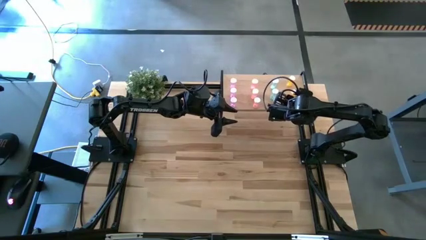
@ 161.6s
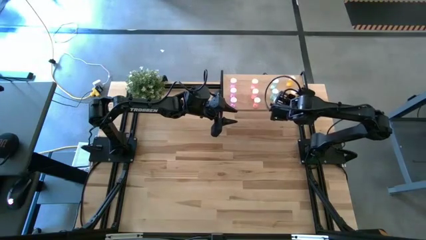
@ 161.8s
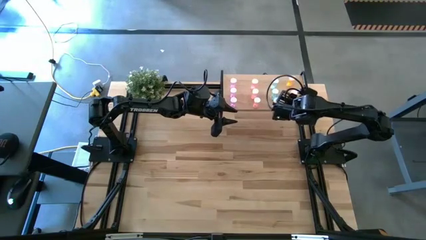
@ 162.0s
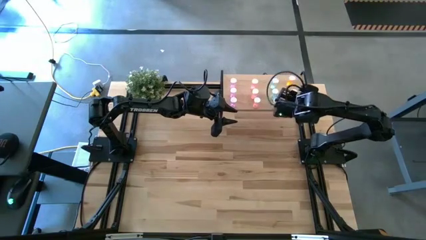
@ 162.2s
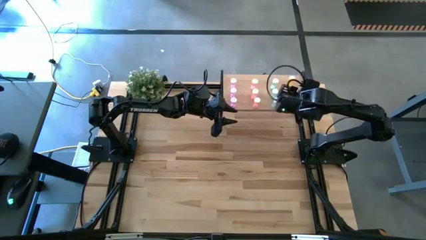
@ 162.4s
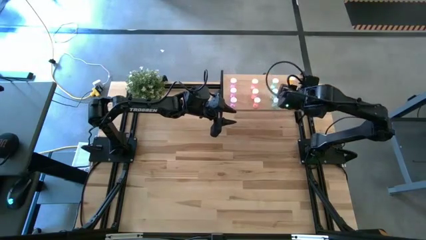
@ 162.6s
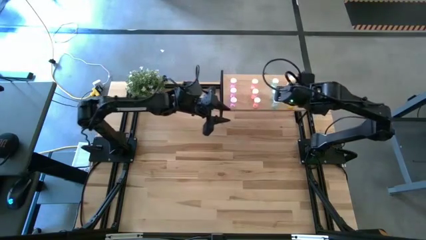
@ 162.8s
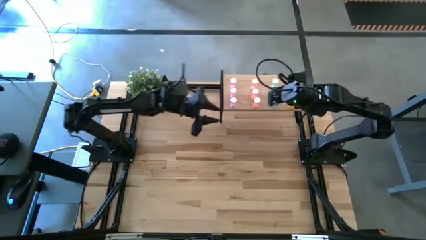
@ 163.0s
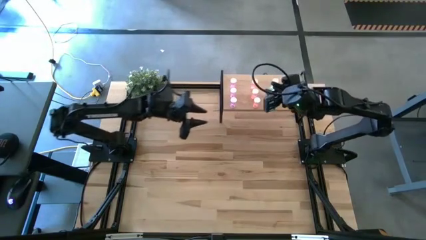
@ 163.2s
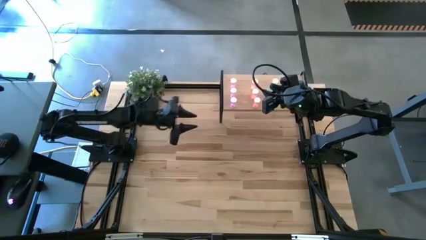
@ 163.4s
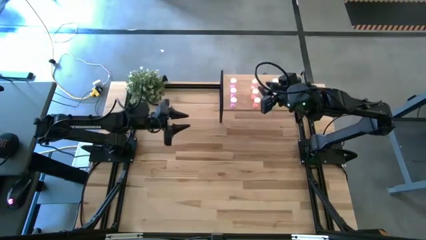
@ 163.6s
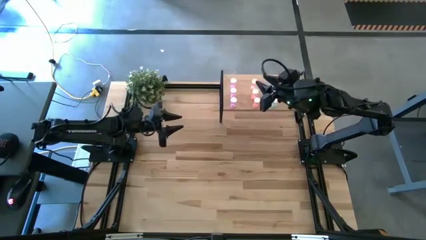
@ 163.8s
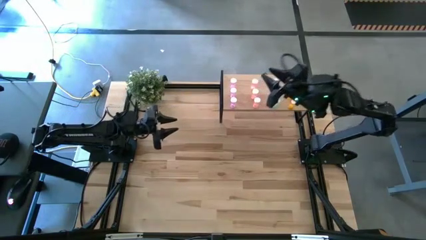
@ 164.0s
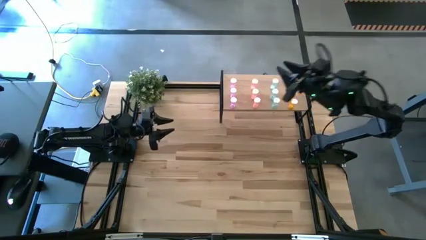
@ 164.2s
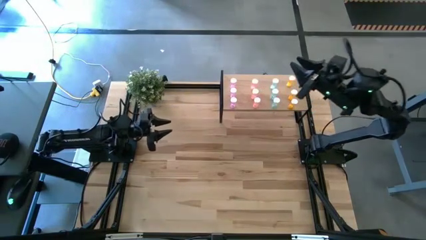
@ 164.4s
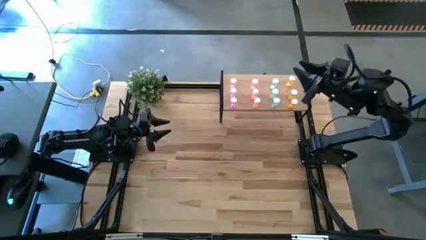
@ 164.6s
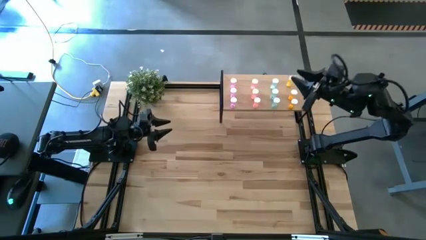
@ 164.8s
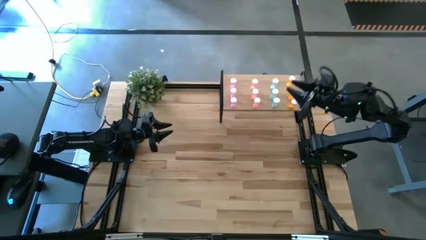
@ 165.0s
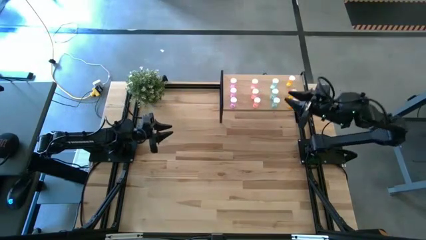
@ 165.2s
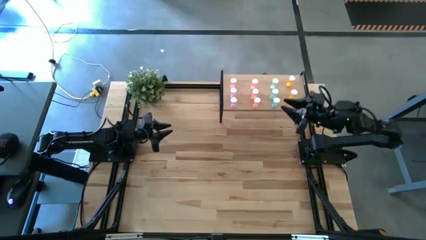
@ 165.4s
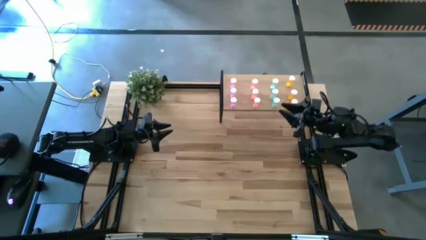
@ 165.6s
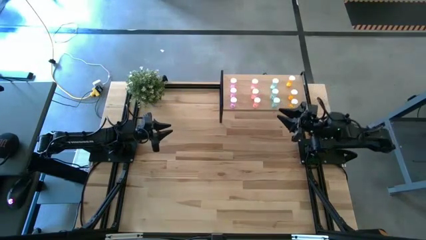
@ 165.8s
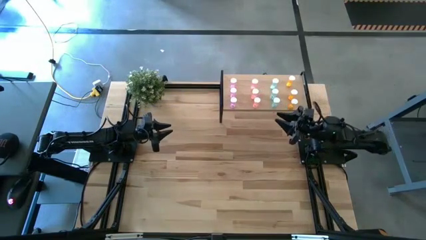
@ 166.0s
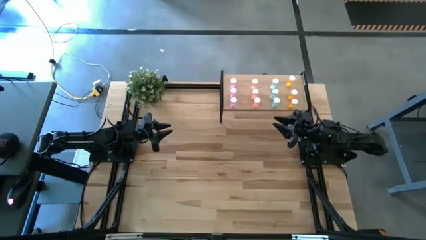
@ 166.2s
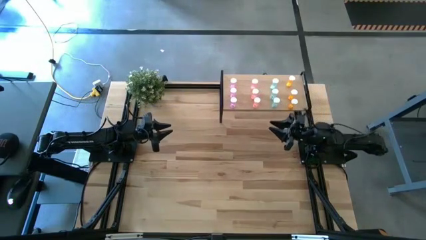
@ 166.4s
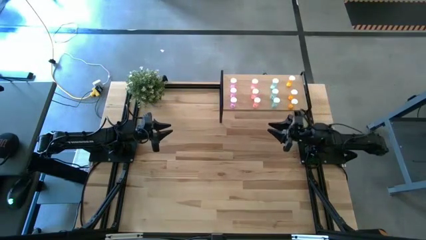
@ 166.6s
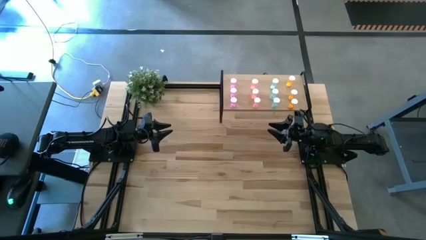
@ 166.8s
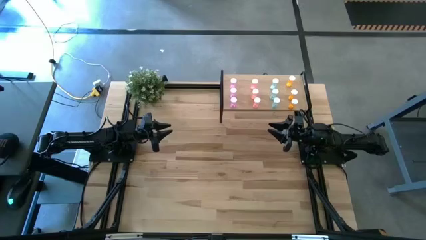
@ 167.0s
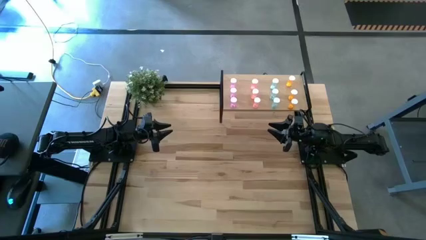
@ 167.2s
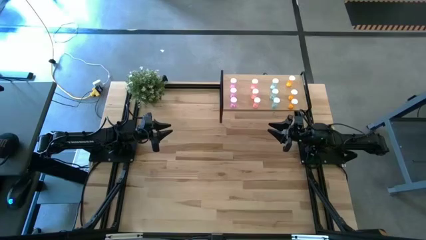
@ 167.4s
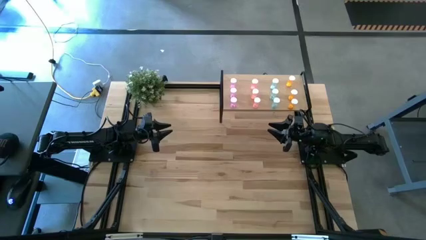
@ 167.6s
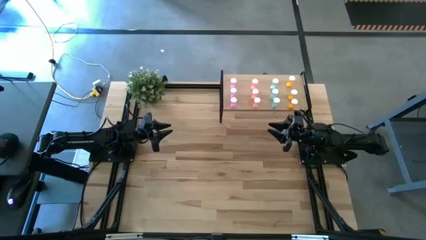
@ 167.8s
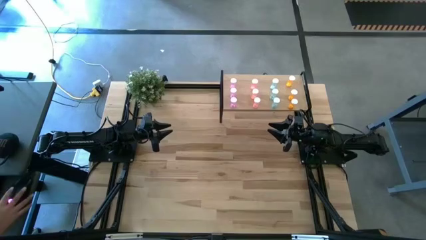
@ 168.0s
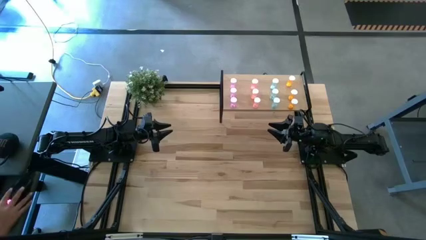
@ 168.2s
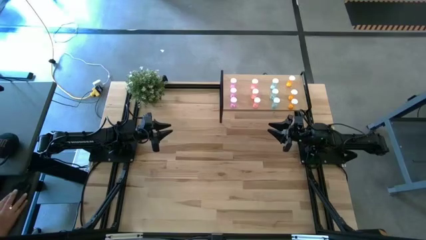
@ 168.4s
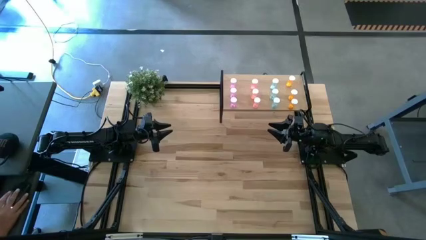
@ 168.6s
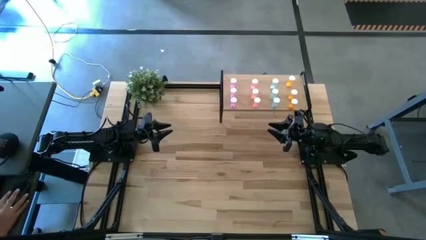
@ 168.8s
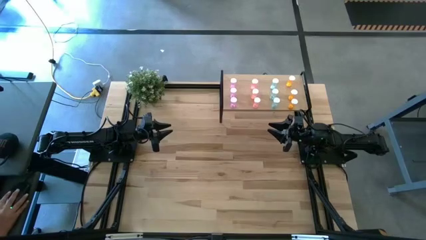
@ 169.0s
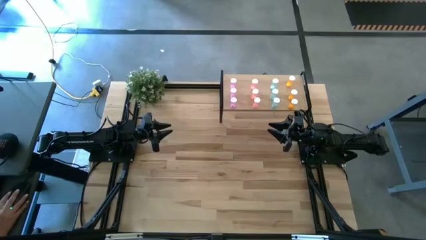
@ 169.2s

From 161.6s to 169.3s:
Task: Pick and place medicine bottles onto shelf by color
Return to Home Position

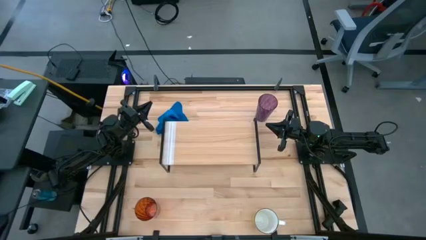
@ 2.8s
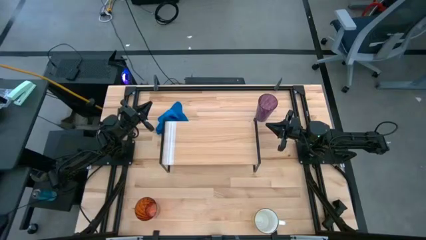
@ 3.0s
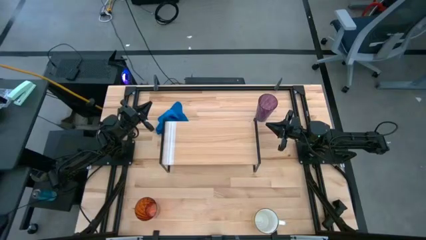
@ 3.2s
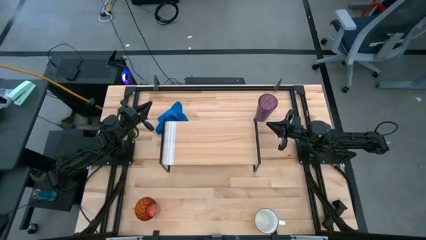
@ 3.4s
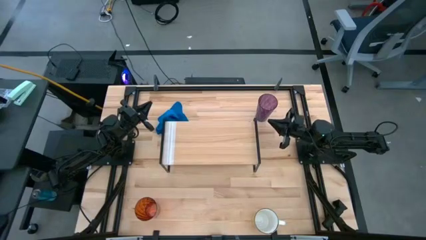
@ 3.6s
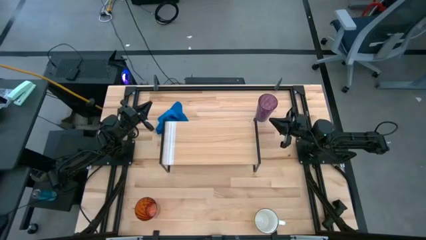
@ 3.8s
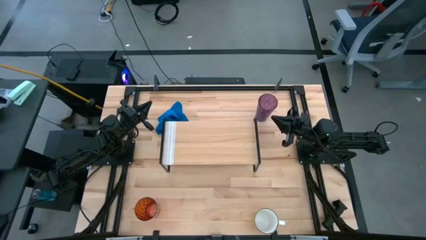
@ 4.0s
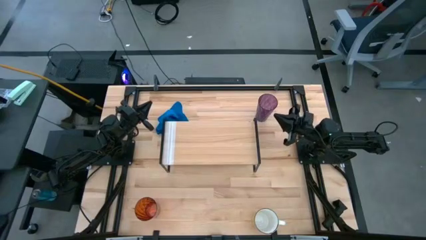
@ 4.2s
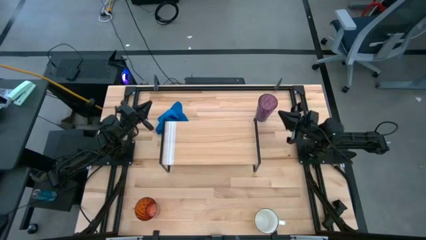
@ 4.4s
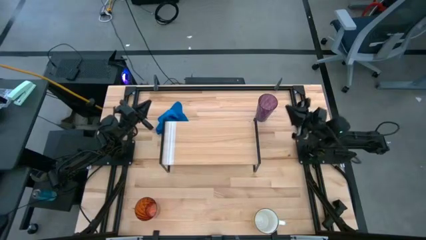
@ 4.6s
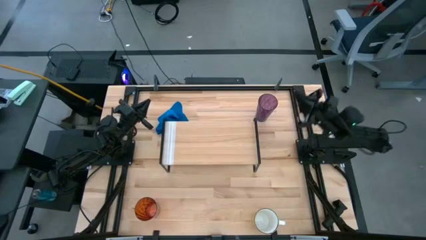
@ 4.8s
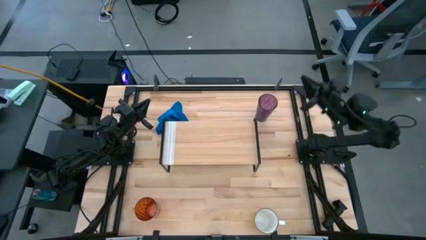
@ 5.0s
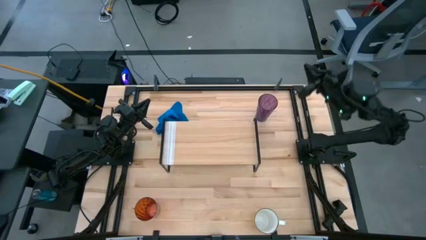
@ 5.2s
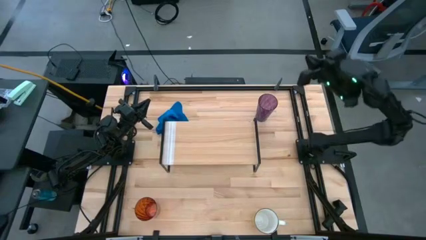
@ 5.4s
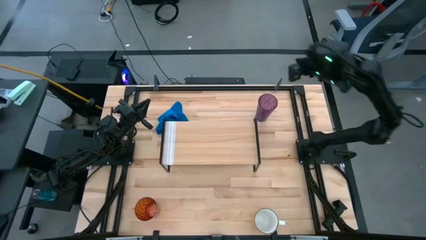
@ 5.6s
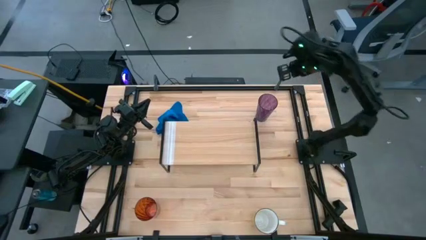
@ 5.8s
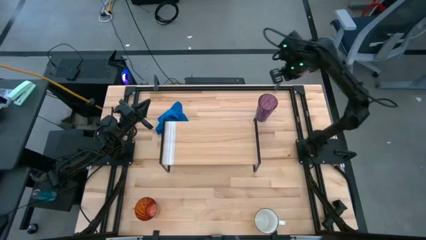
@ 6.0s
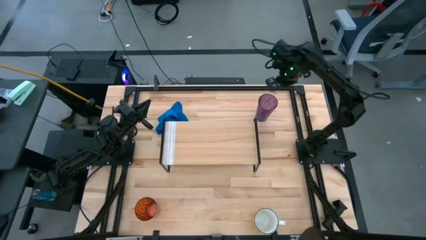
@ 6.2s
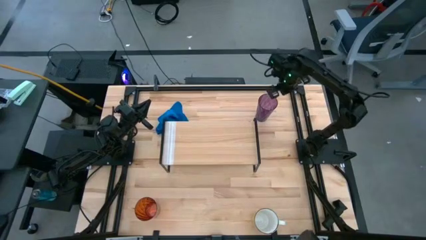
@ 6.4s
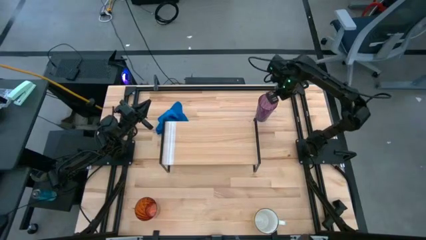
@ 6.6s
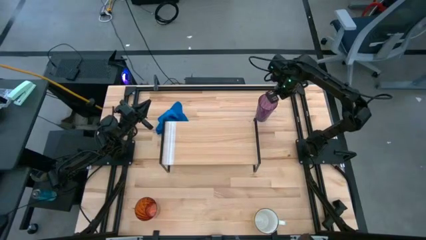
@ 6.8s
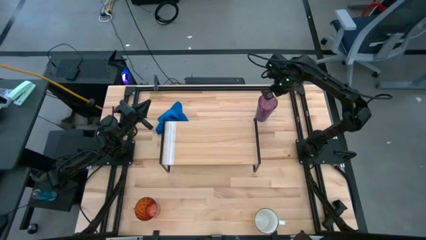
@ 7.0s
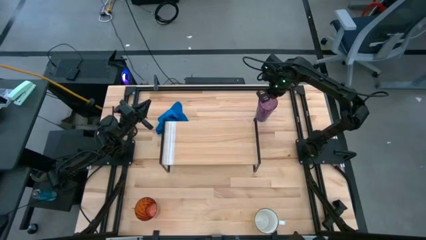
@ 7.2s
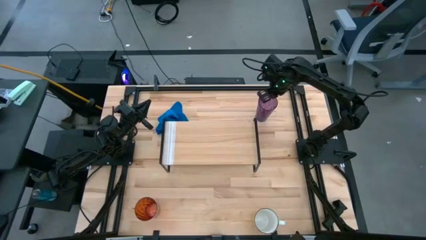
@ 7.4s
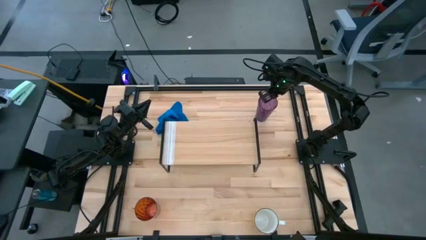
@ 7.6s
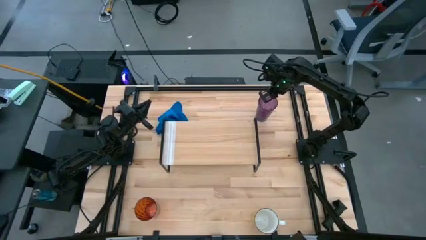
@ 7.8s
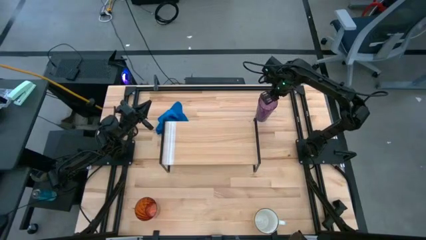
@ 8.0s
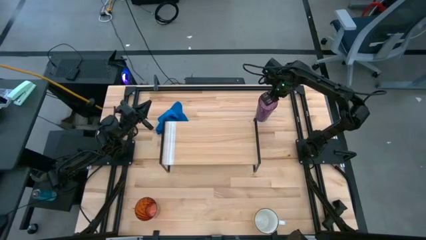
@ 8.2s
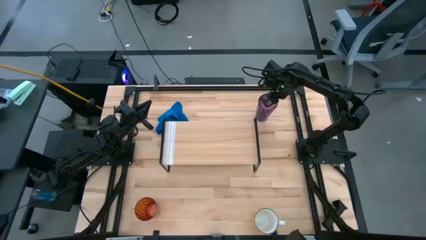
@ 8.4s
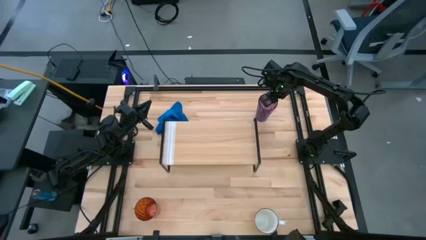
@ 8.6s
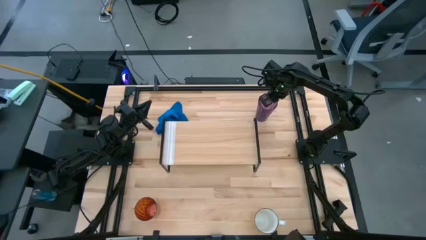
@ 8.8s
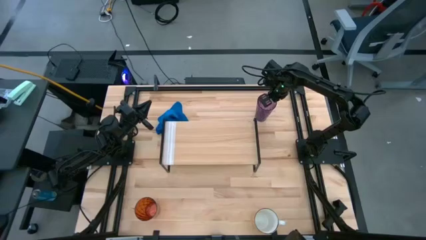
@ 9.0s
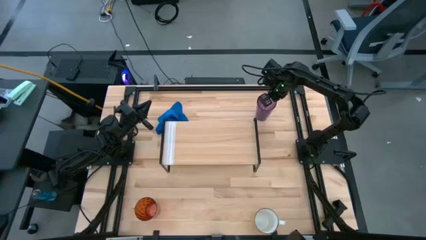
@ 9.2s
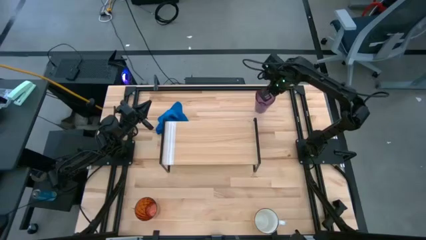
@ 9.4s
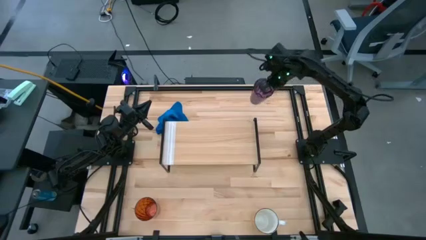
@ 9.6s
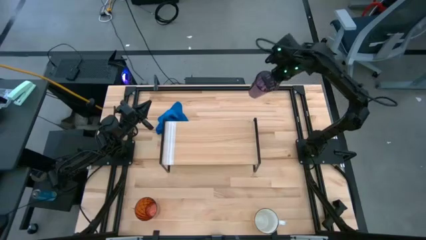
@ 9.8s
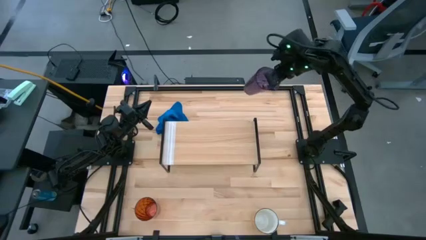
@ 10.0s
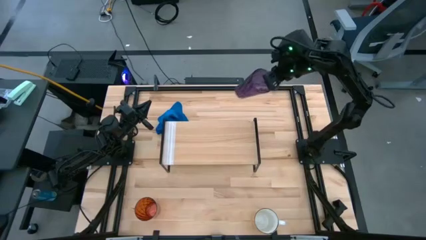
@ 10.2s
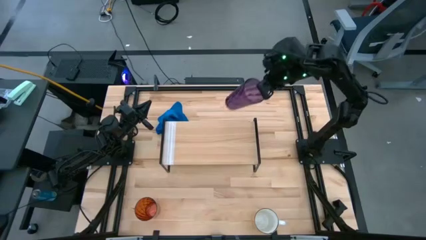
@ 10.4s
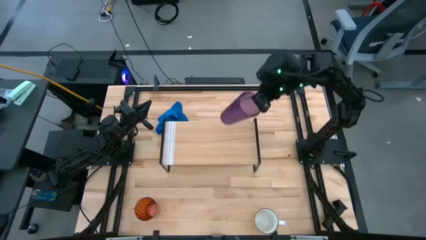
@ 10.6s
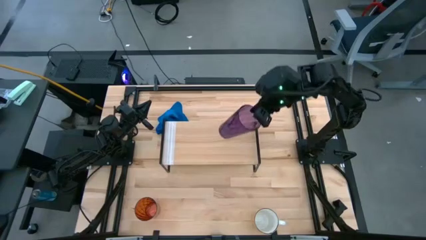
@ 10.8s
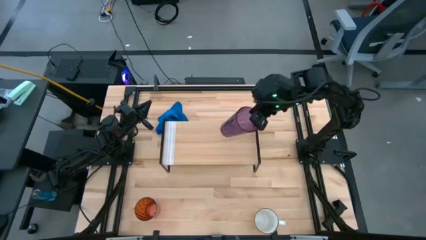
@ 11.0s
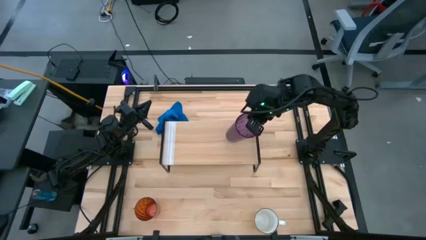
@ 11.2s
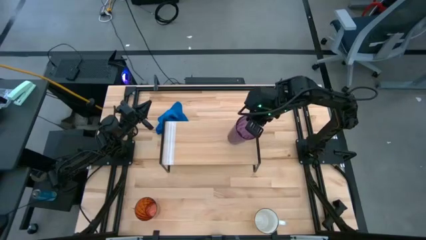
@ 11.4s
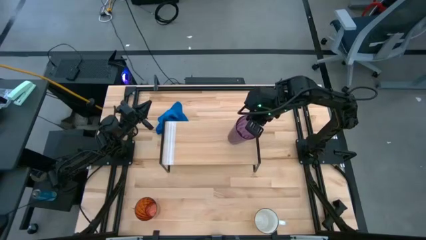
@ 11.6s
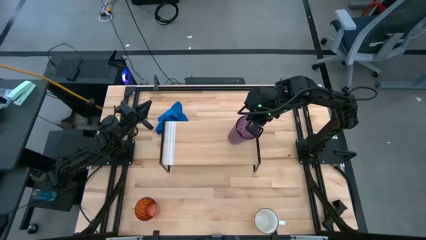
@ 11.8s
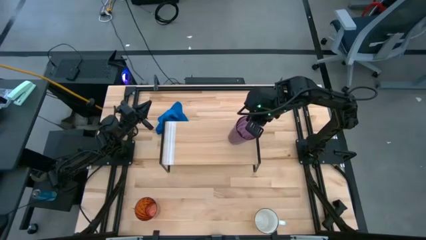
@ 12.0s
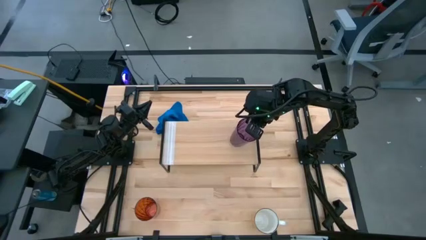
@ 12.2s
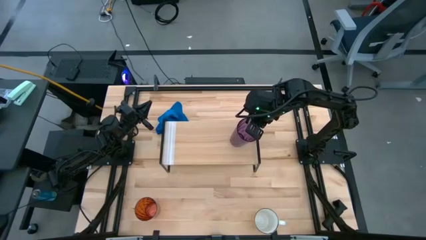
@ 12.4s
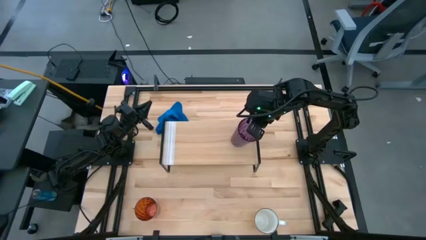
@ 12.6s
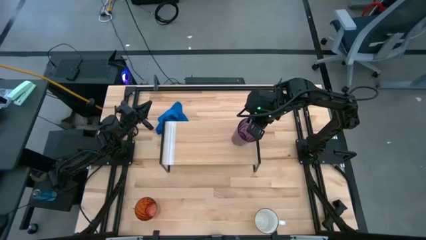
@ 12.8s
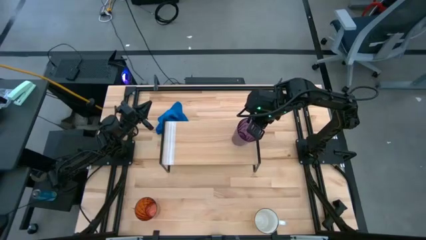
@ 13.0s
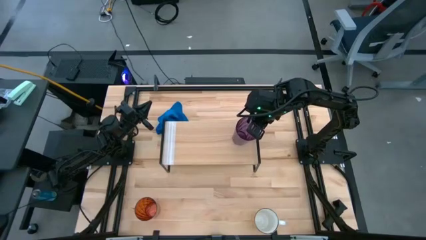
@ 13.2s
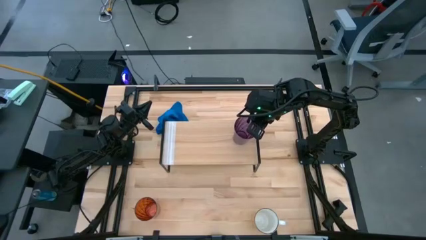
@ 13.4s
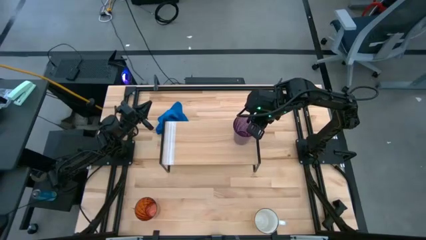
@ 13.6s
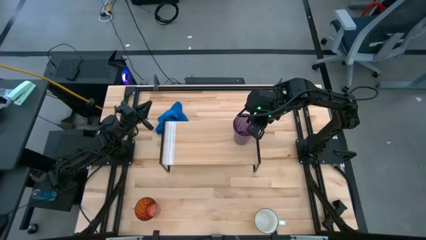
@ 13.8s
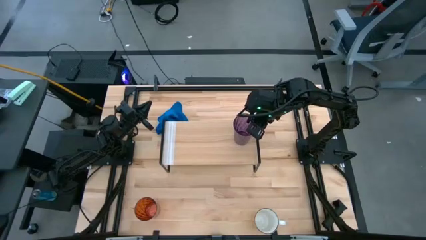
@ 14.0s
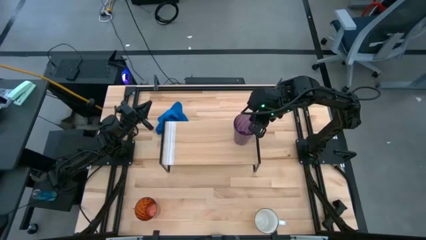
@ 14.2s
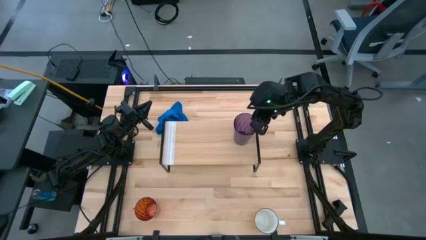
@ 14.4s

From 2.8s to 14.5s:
Task: Stack small to large cups/mugs on shelf
Put the violet cup on the shelf
